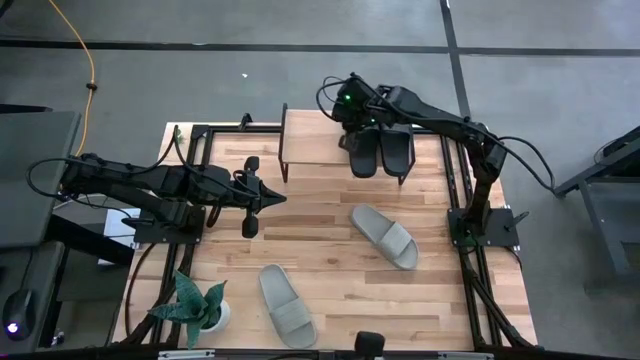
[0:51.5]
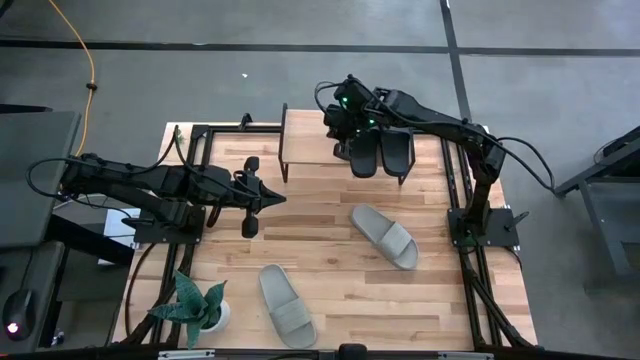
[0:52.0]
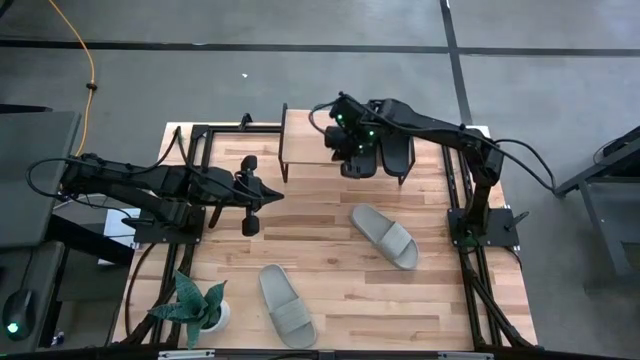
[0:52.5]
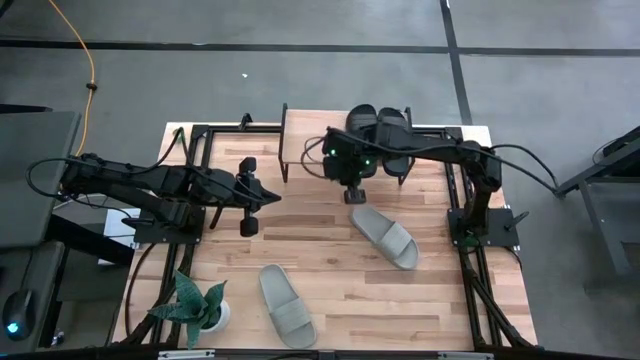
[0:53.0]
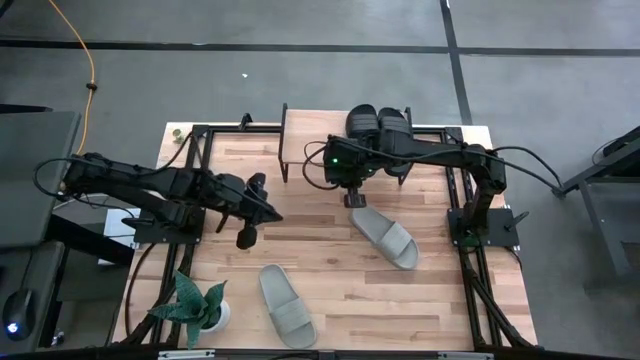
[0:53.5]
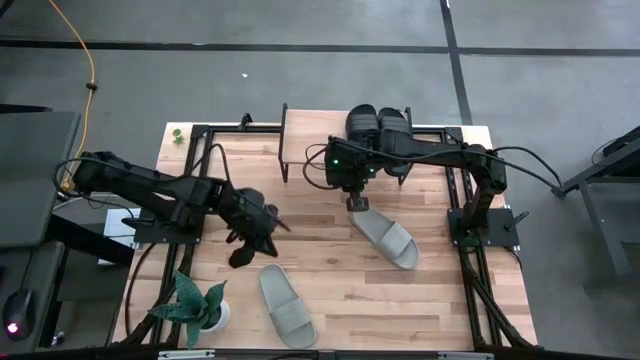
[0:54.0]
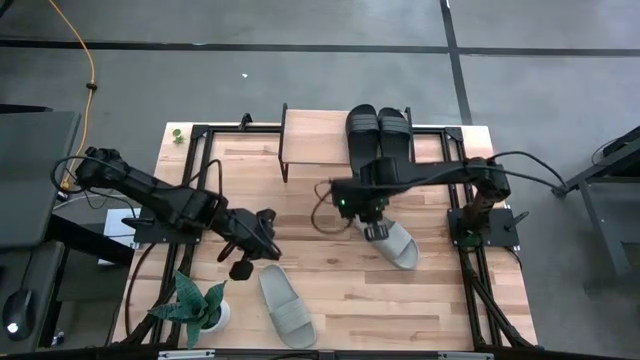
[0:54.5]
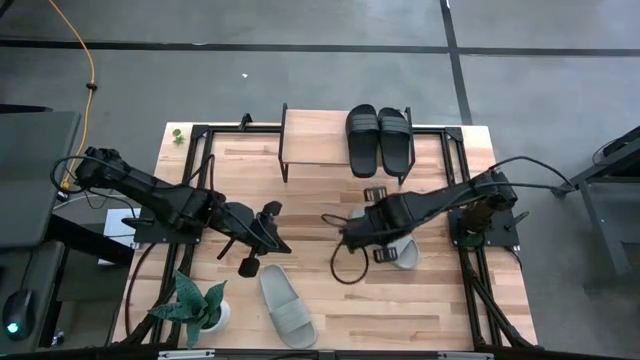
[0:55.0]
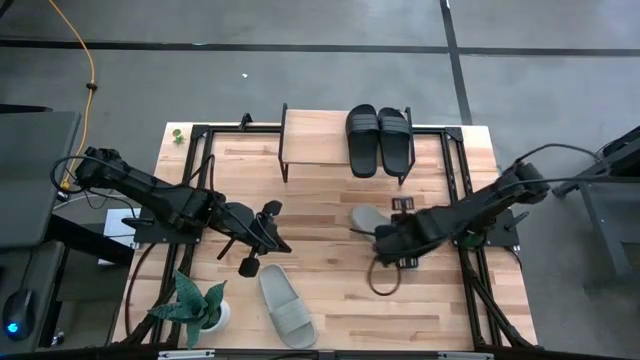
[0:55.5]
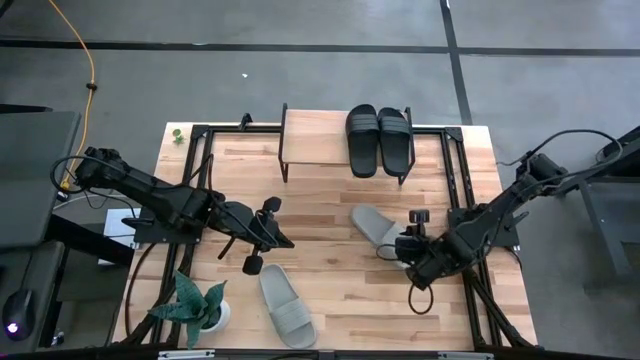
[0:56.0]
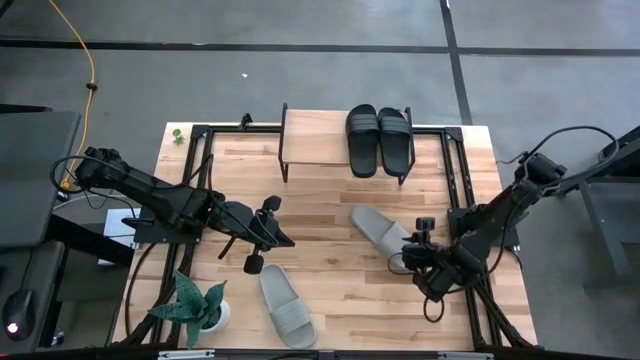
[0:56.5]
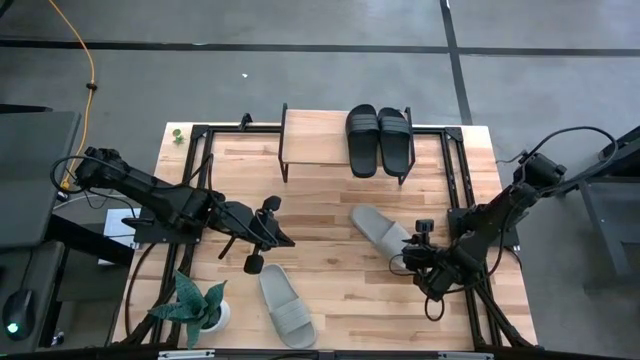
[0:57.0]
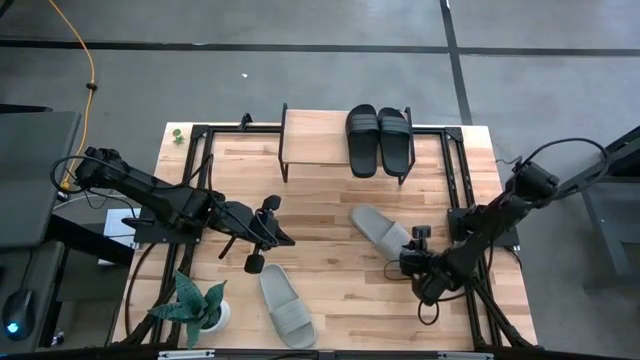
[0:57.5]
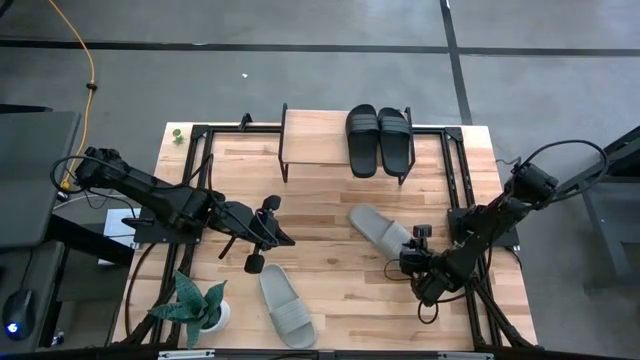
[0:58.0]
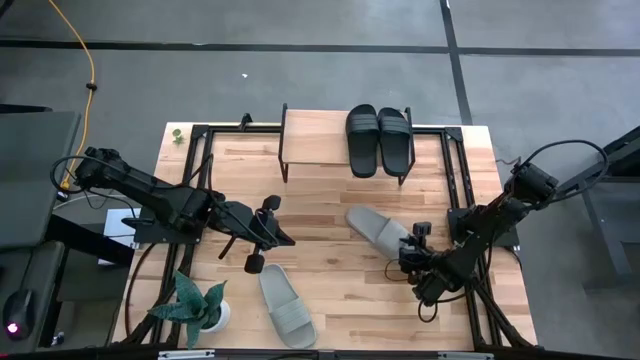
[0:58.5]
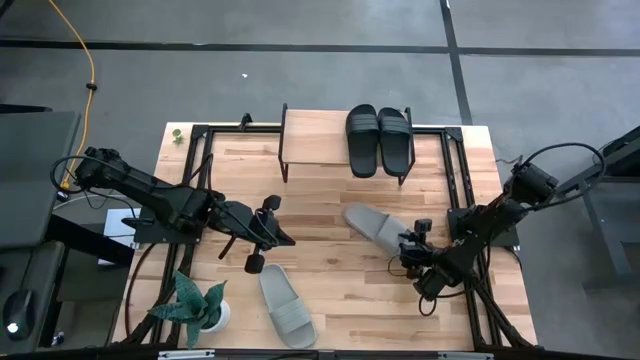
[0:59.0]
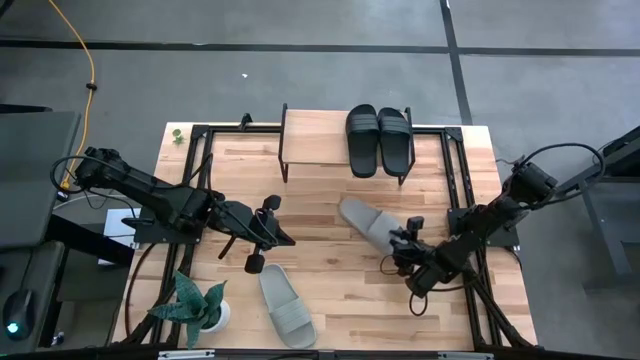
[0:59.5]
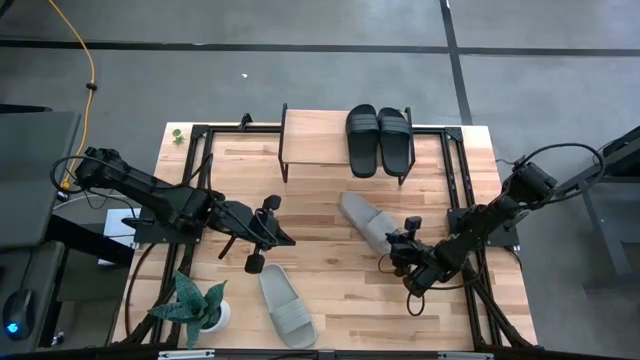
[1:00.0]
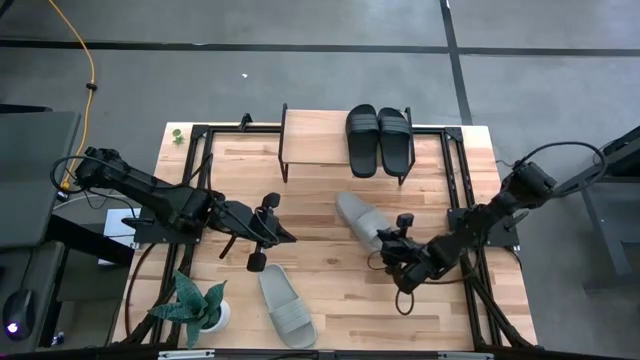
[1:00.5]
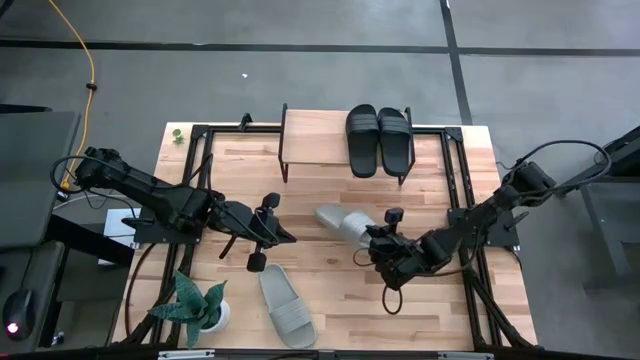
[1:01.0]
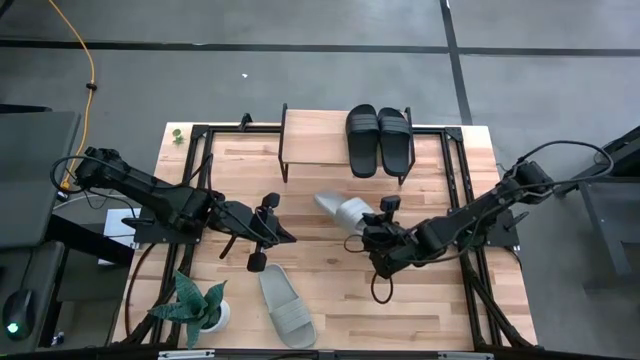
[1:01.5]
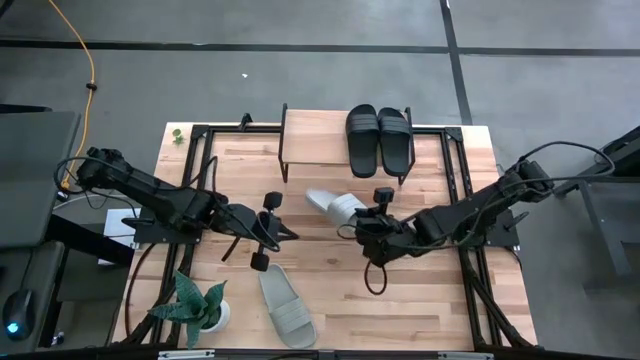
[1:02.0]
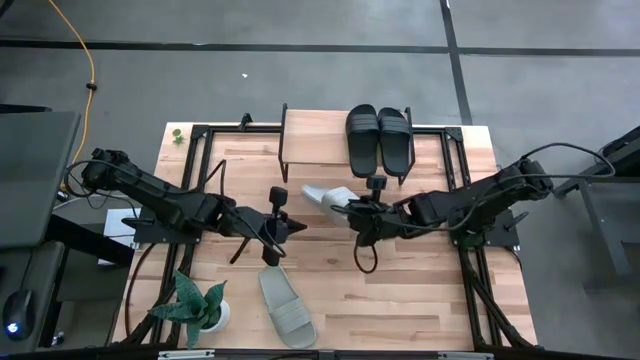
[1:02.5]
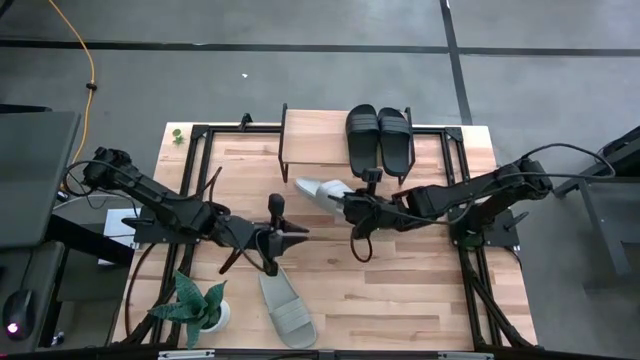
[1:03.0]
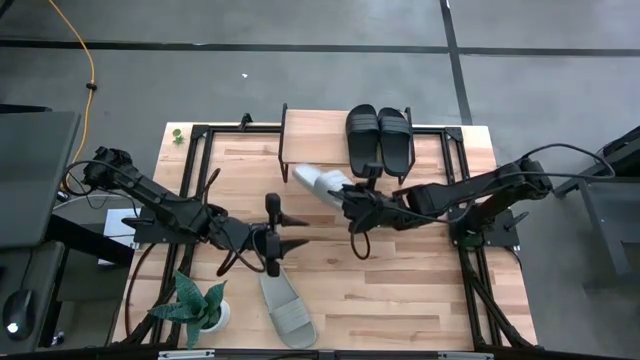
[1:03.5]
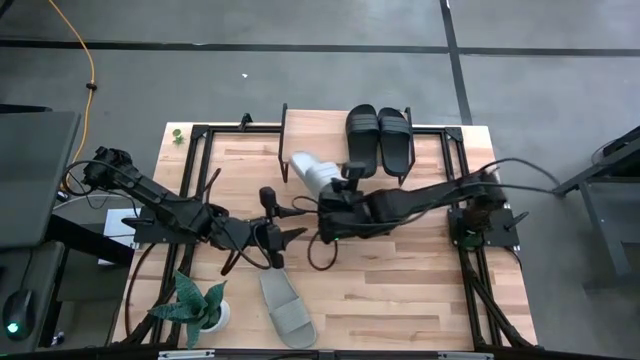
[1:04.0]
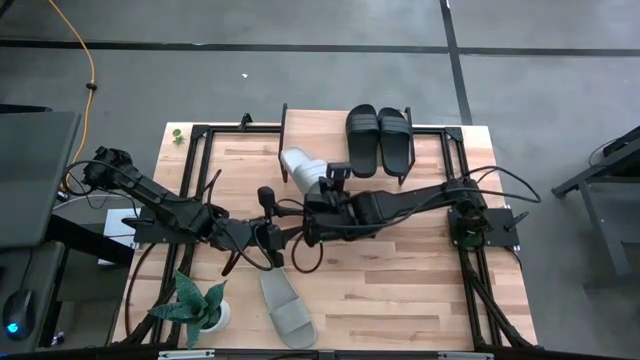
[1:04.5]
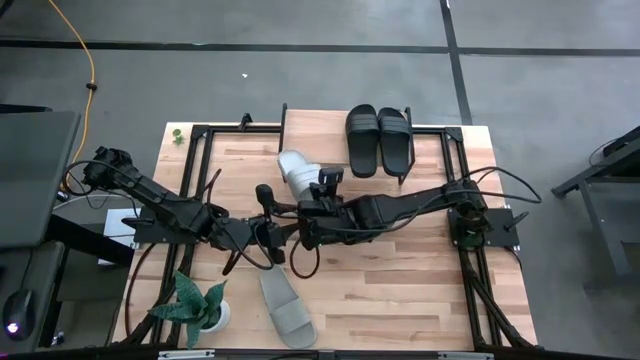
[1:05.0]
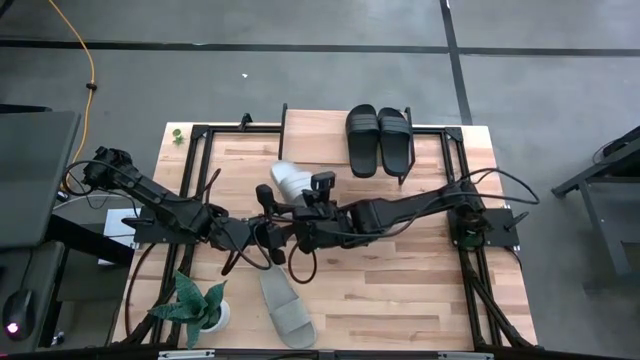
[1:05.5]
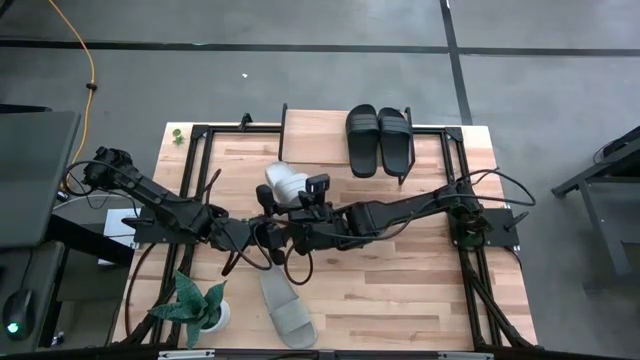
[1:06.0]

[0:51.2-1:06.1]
Task: Pick and place slides into the shelf
Put the right gray slide on the shelf

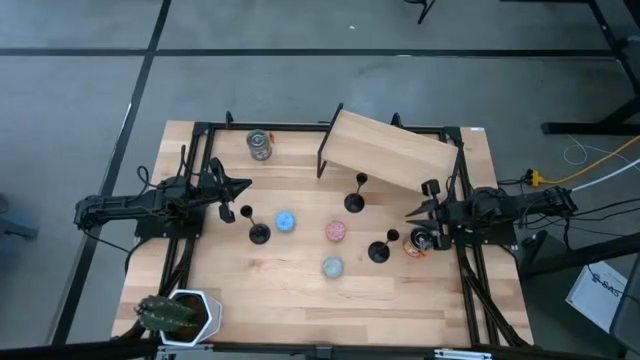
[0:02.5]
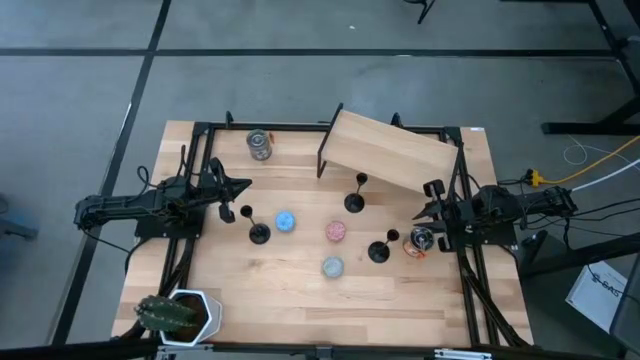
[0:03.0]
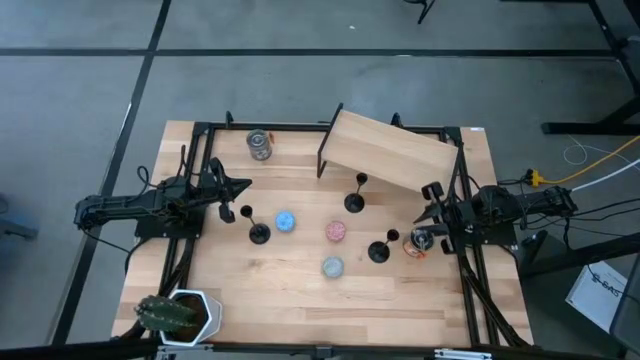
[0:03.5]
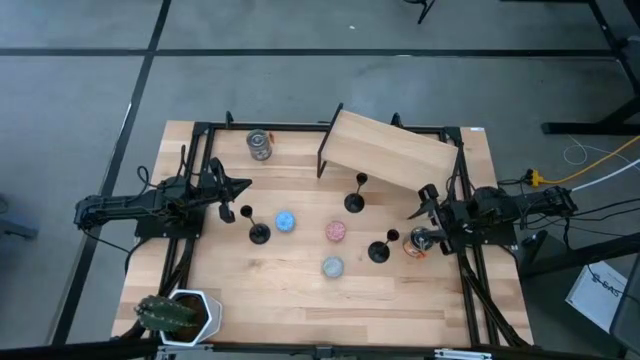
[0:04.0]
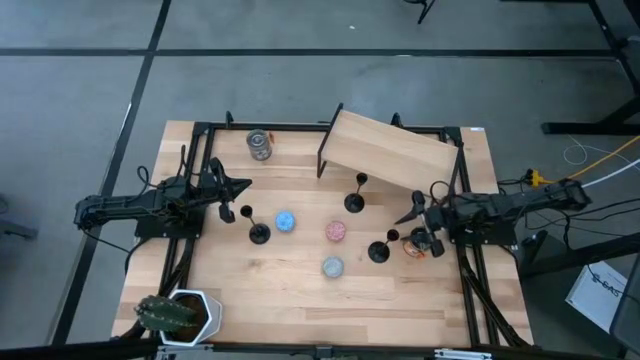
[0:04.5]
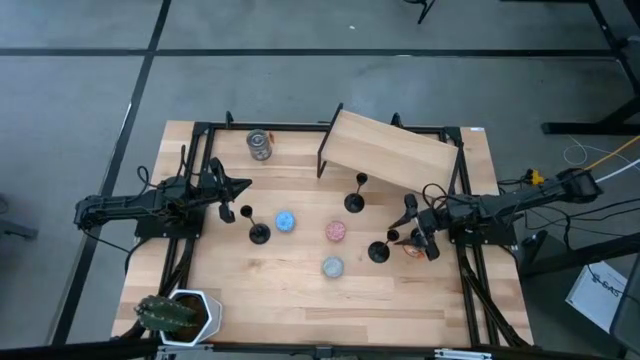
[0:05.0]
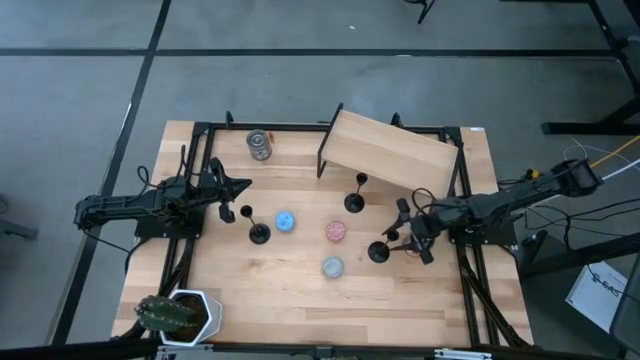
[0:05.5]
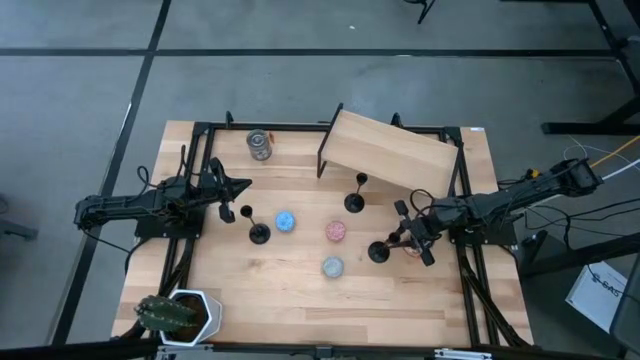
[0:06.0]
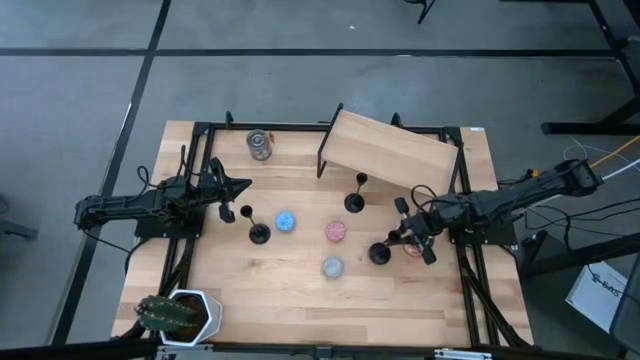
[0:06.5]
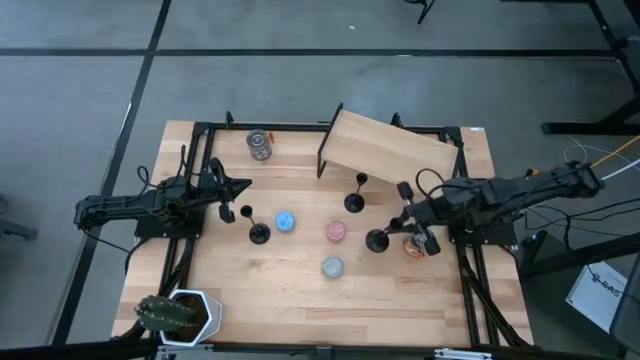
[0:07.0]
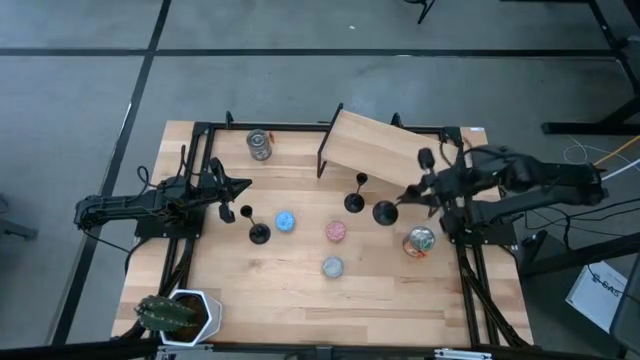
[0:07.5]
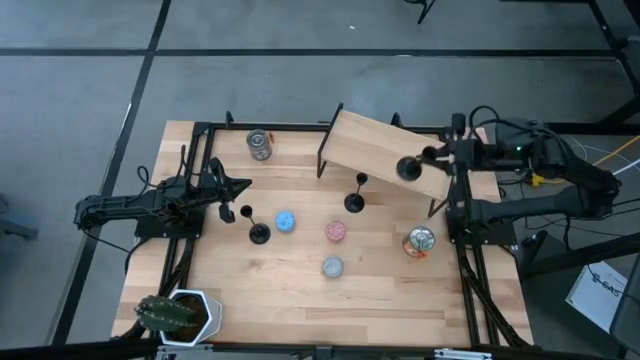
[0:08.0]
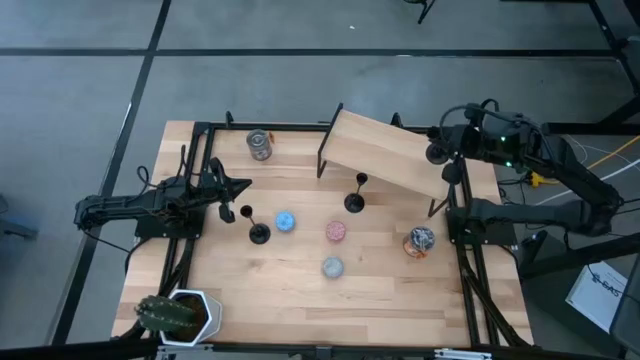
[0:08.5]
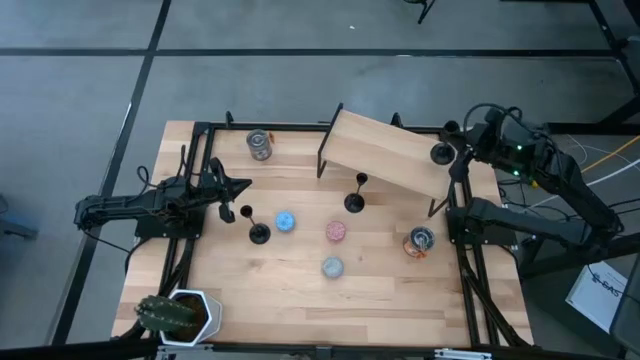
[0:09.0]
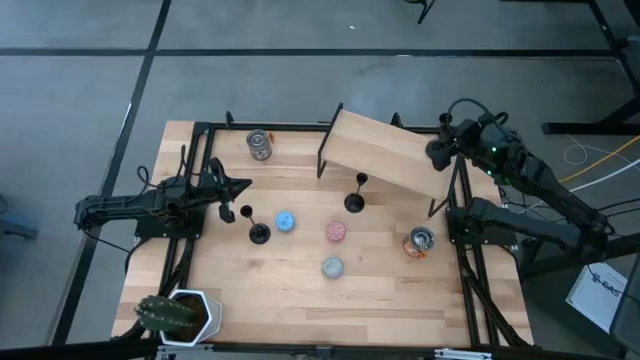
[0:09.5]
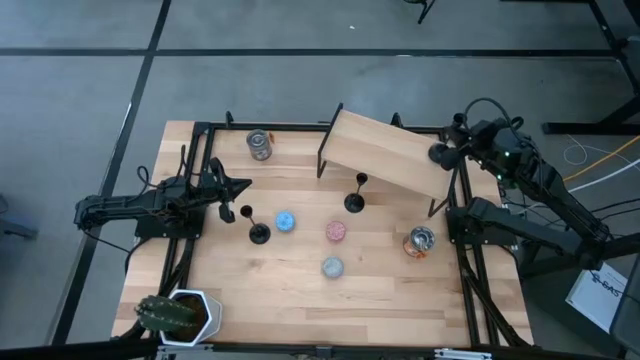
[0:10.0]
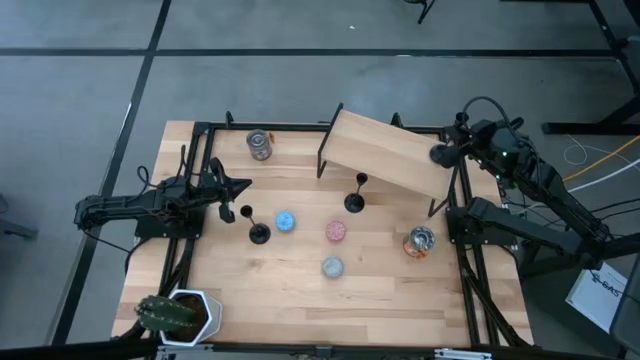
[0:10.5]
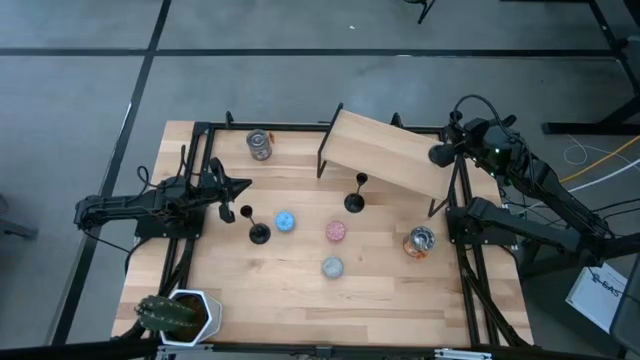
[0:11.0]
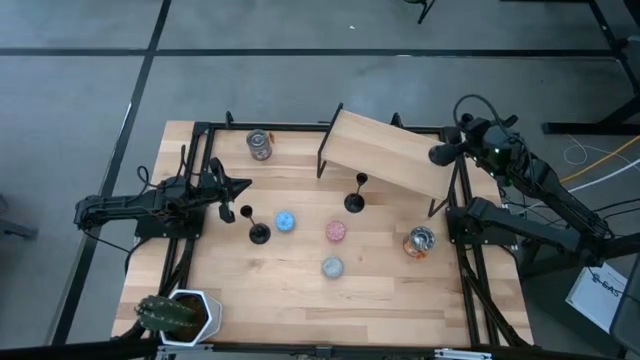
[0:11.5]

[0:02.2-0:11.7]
Task: Pick & Place candle stick holders
Put the bottom right black candle holder on the shelf
